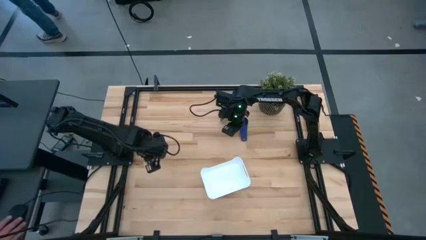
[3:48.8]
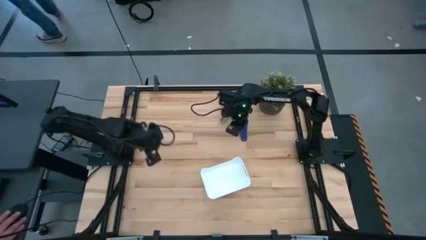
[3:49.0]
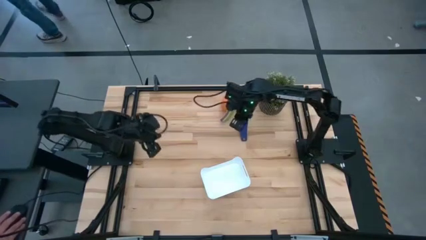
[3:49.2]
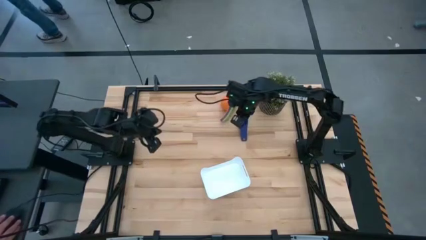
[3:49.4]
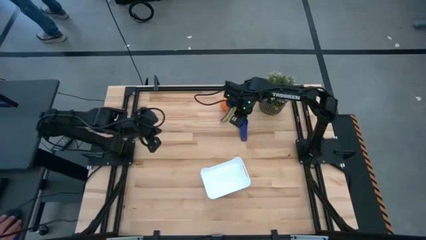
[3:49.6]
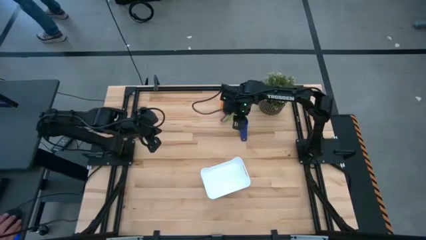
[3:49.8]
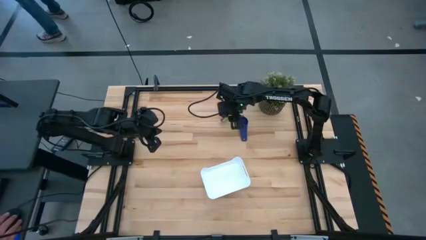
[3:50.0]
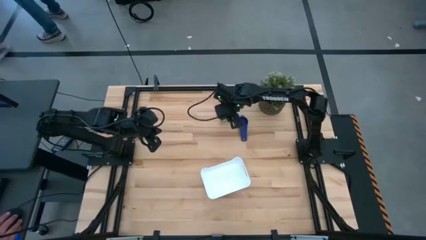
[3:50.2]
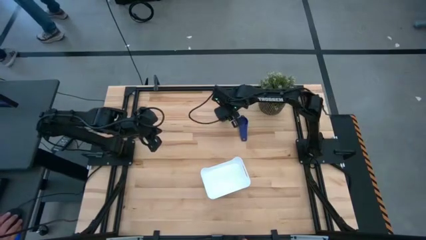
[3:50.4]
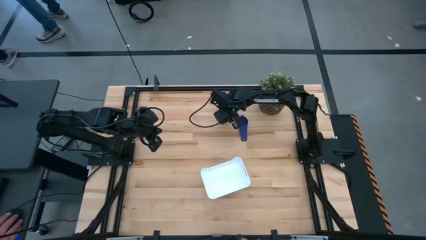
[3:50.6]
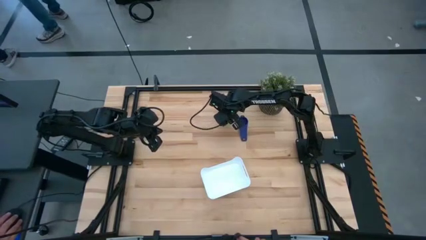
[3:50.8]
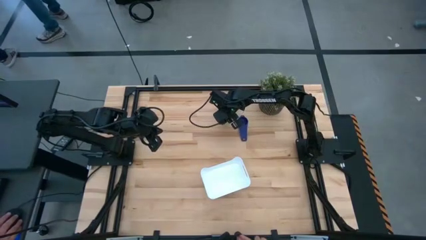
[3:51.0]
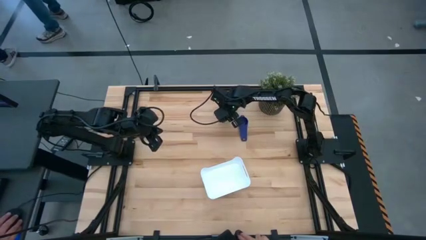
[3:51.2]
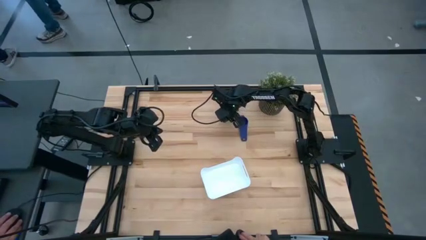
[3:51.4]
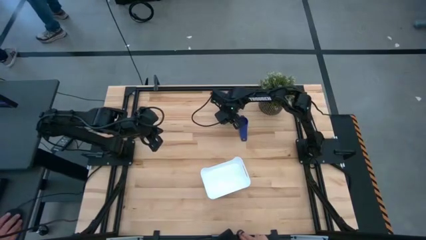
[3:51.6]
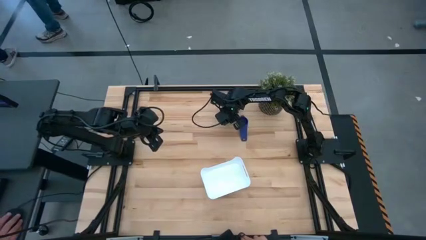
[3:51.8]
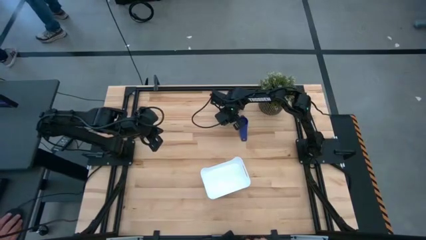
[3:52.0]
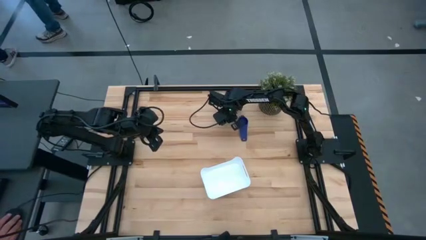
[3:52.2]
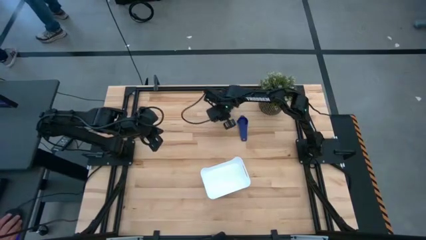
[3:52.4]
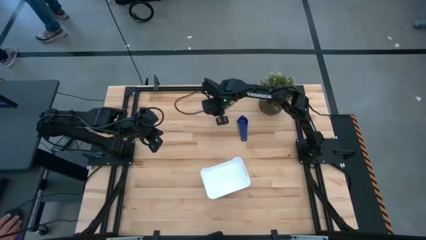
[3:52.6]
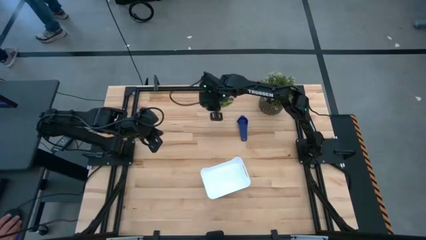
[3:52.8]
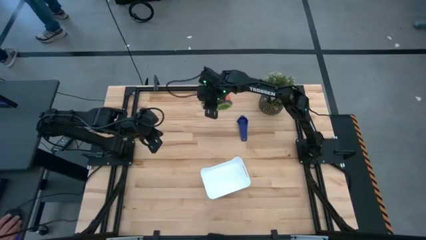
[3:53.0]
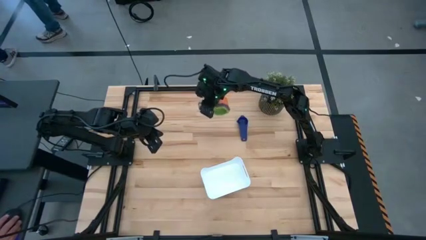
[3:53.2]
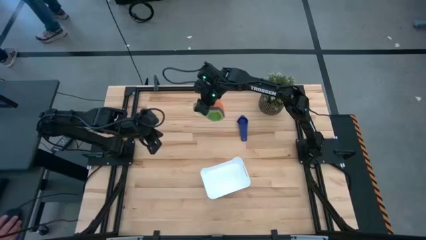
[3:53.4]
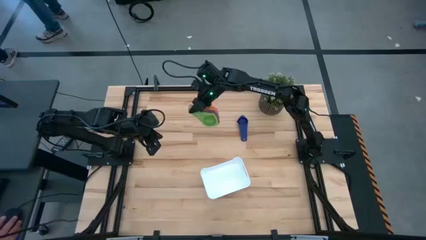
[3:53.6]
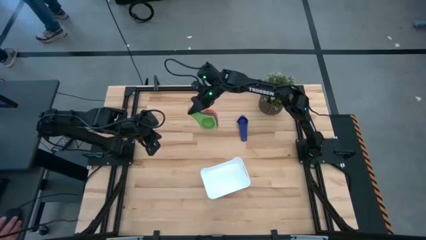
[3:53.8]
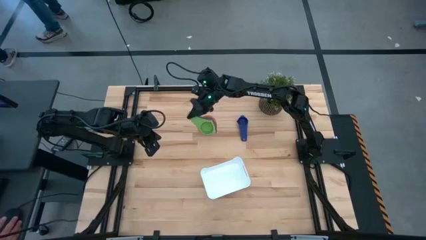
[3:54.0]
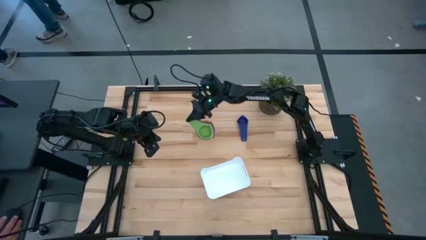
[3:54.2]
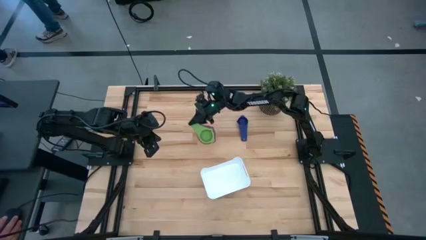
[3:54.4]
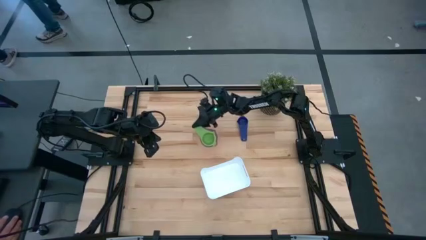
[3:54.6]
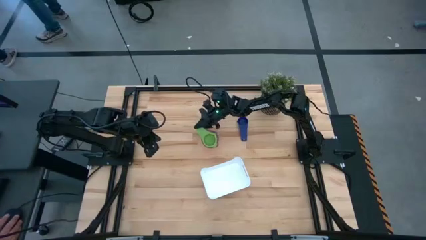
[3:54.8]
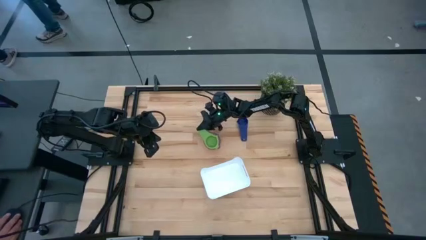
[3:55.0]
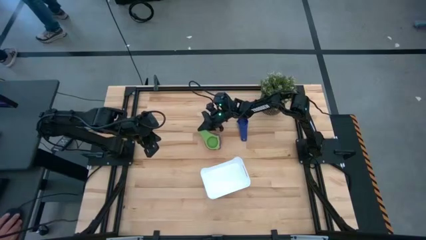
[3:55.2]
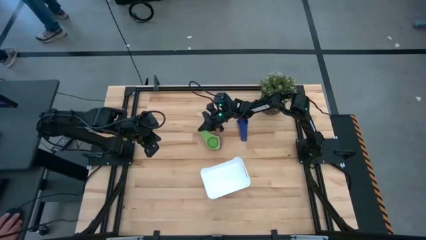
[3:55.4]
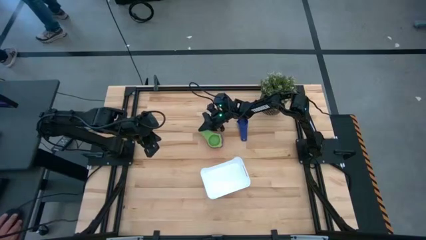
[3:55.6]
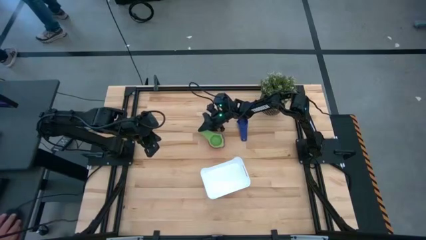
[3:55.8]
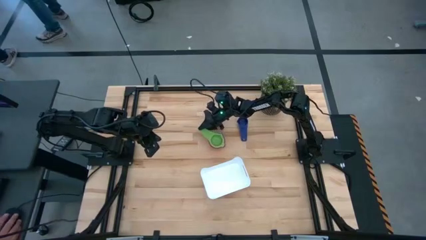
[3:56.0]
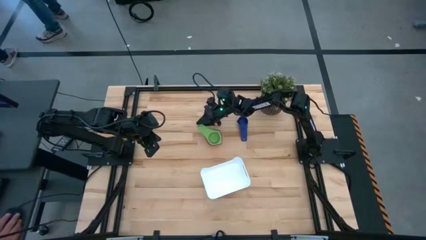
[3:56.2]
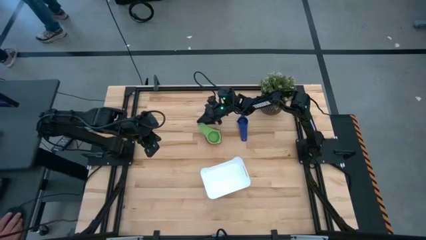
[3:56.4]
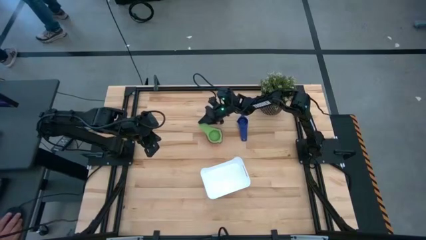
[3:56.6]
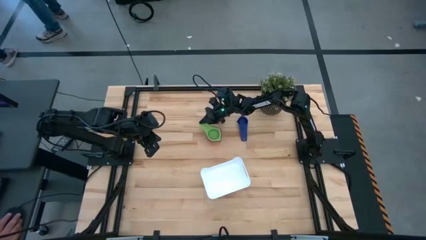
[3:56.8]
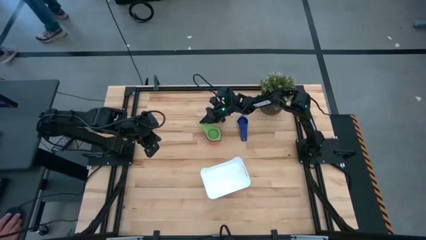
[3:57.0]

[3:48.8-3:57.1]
Task: Nest measuring cups in basket
Adjust the nested measuring cups

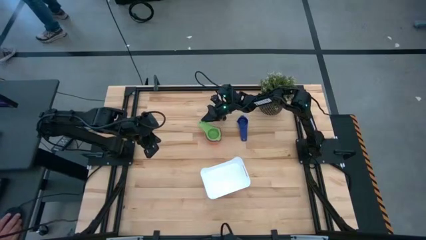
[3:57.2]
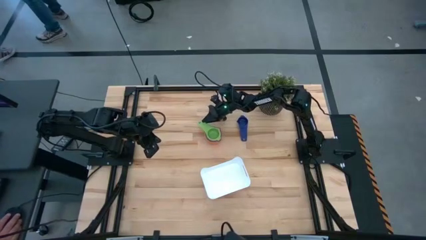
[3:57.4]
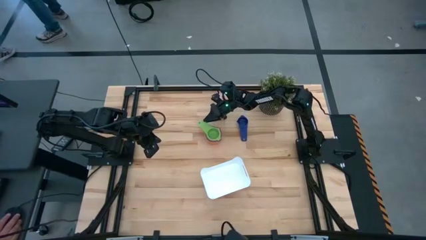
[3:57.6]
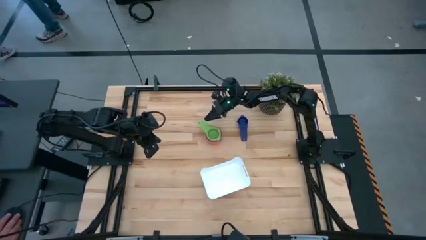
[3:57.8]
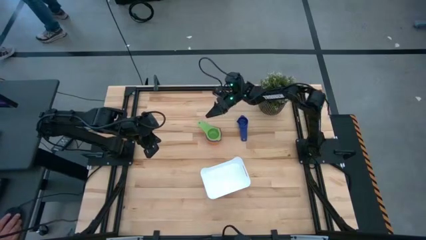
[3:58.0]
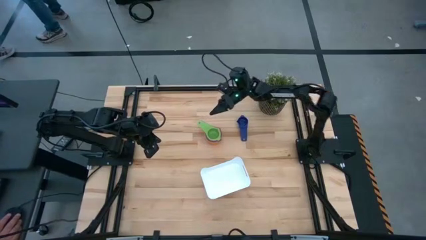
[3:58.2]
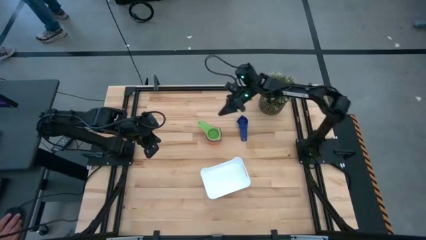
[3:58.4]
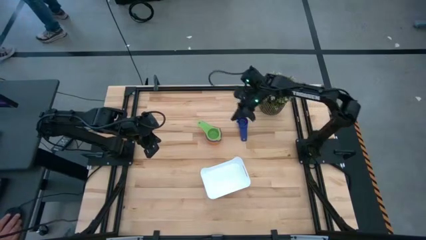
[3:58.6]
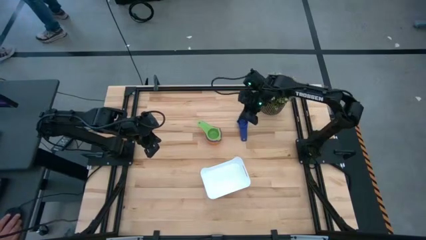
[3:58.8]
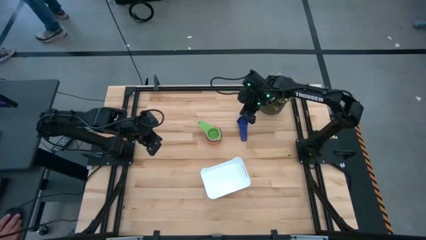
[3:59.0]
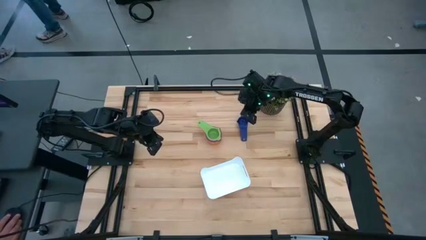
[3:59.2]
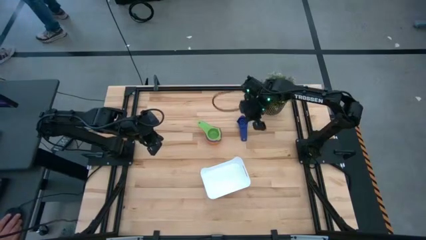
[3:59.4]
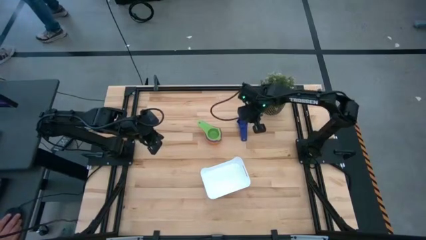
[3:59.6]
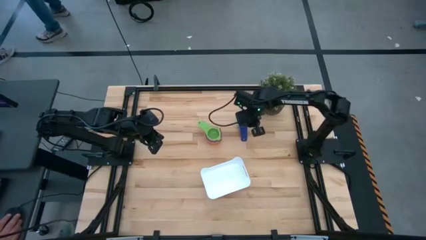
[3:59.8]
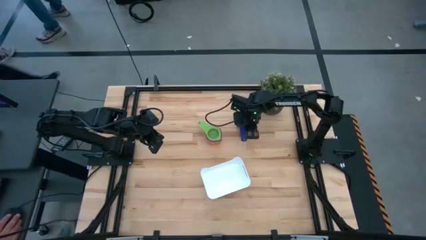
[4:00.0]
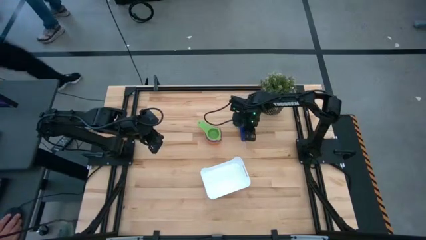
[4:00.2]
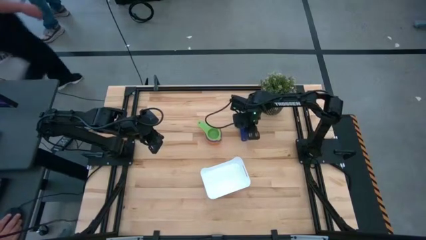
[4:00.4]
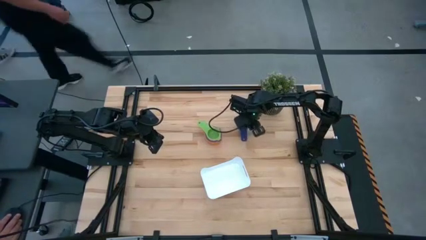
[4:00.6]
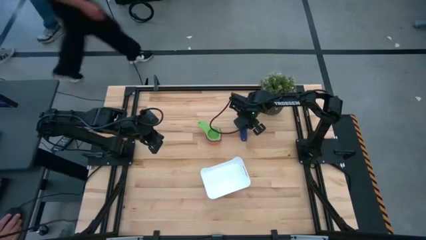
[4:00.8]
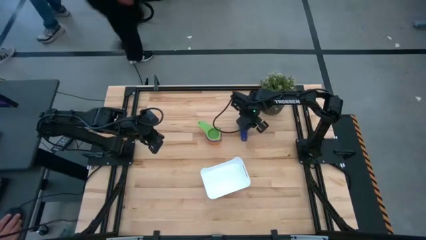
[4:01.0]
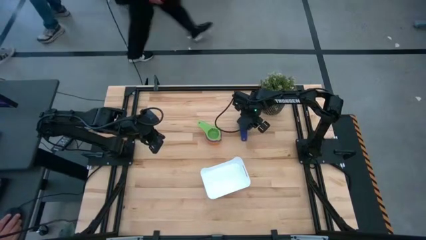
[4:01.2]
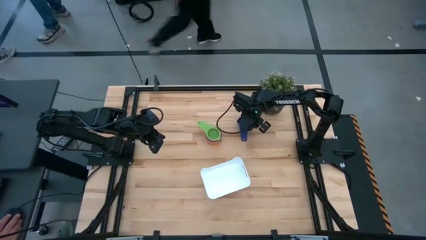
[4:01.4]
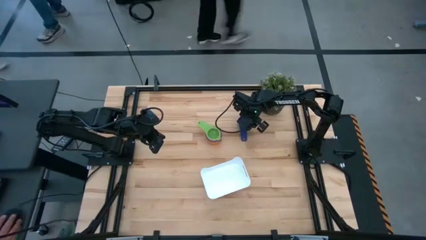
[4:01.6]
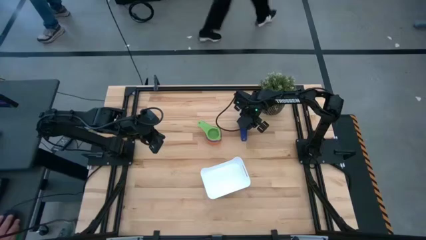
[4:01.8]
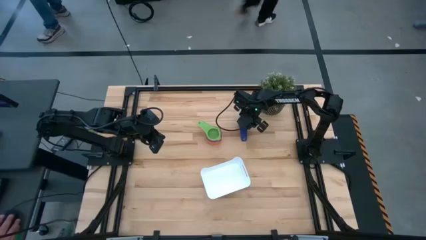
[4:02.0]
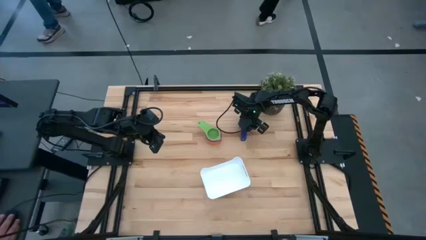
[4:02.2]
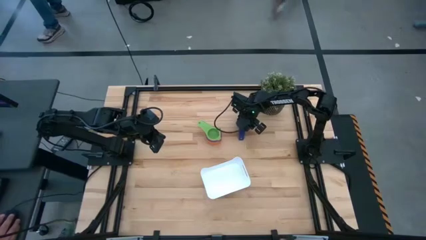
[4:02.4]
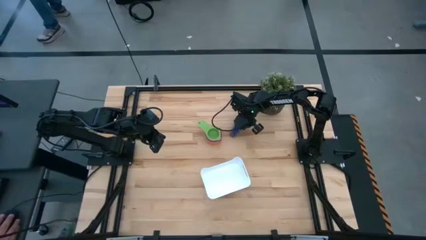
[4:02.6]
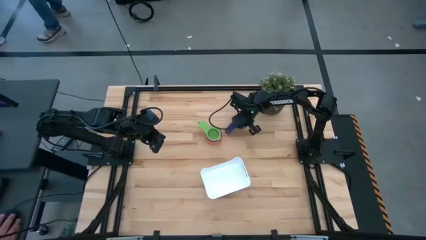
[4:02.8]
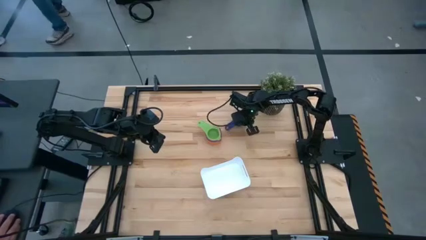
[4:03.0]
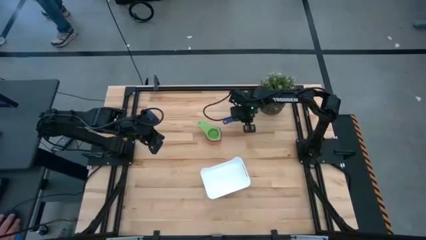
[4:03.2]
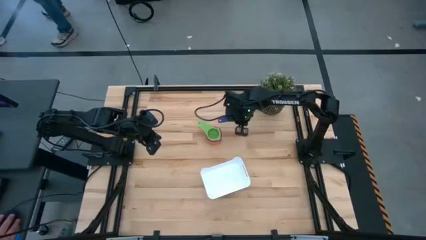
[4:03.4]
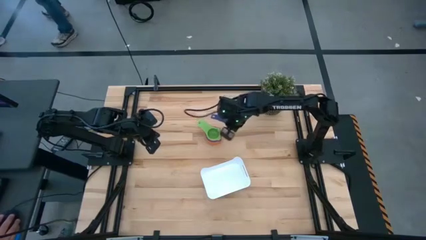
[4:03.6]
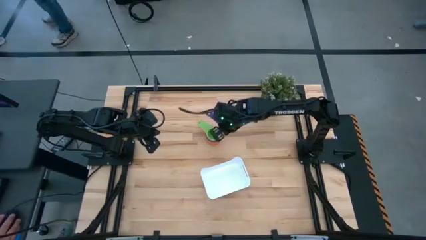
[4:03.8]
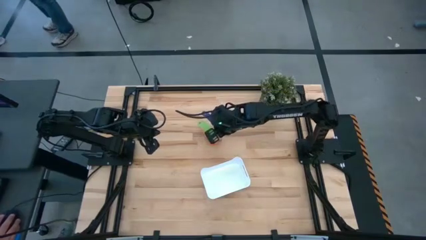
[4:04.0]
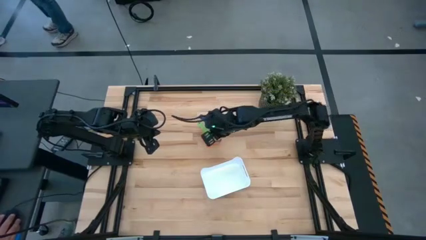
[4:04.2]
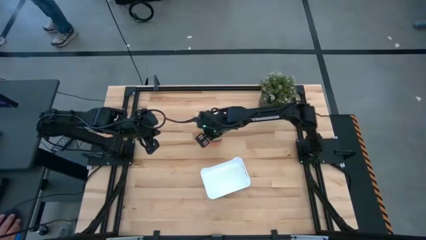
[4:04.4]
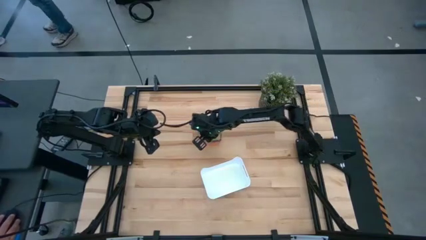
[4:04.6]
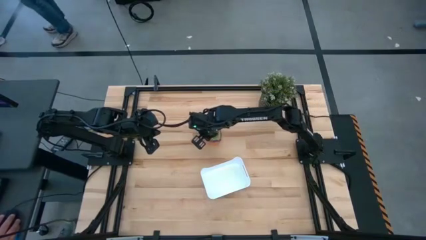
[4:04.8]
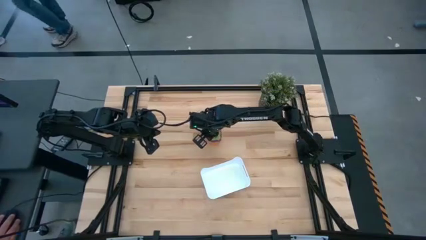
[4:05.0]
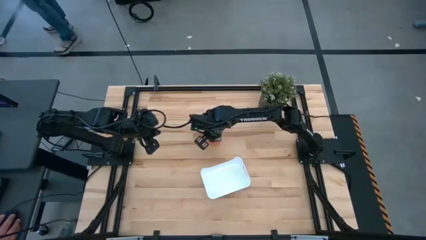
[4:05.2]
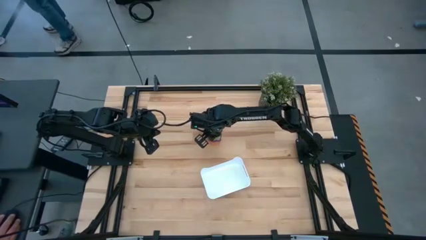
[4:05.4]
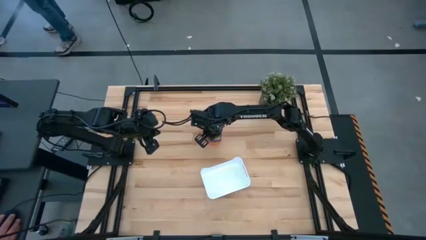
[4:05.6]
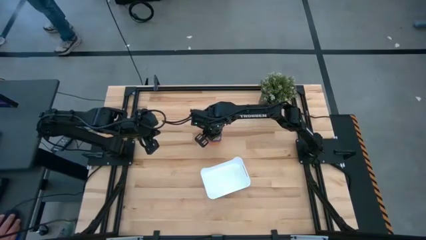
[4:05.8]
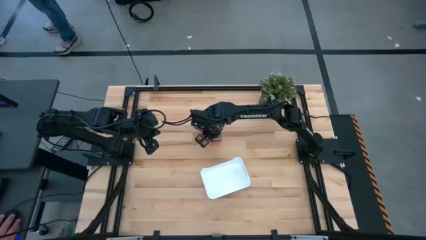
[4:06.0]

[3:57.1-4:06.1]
Stack the violet measuring cup into the green measuring cup
